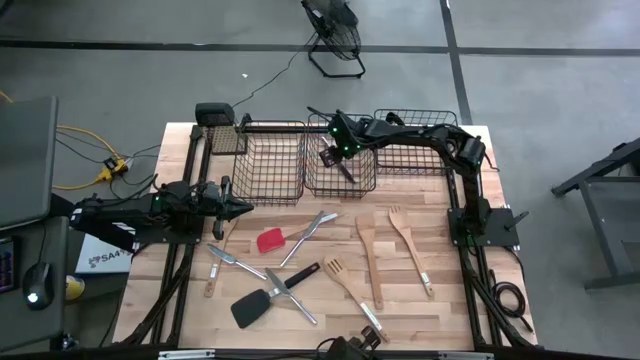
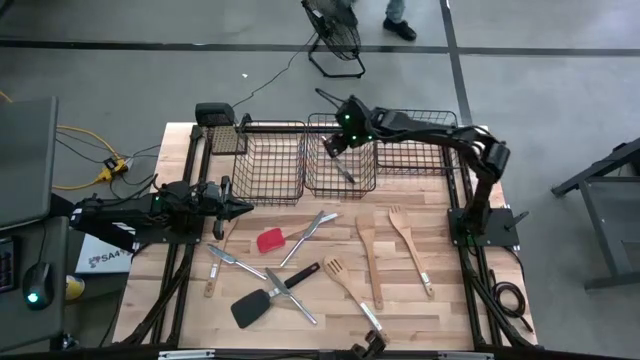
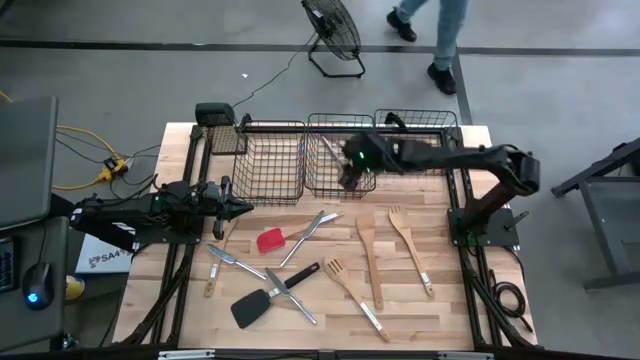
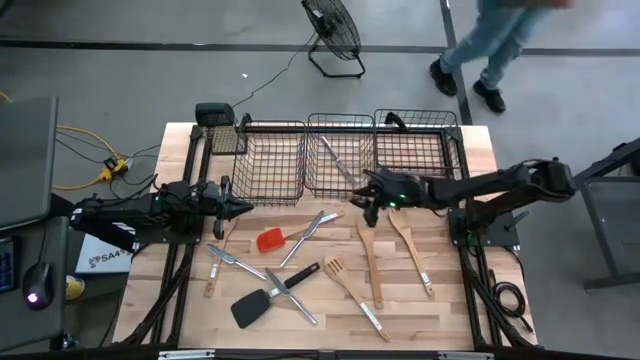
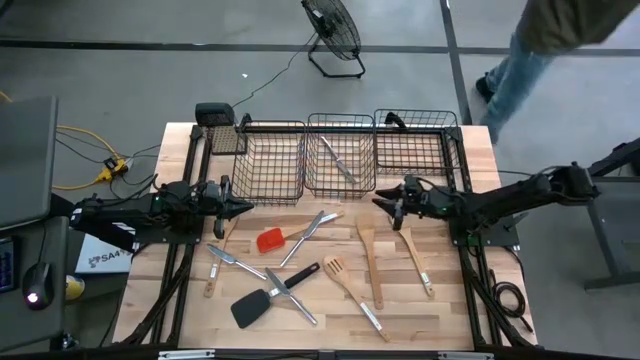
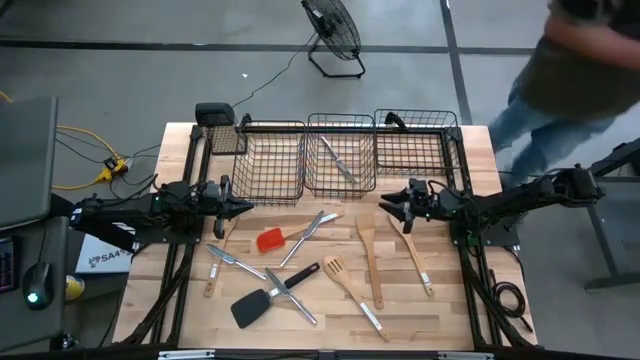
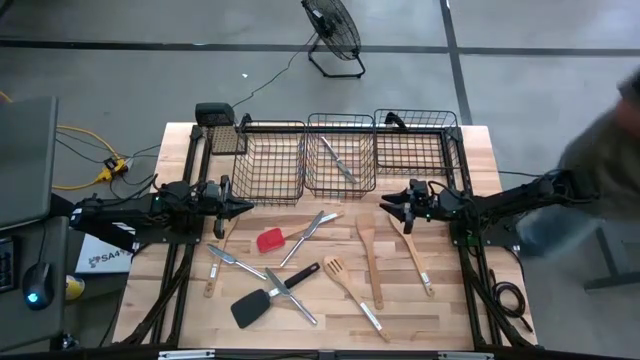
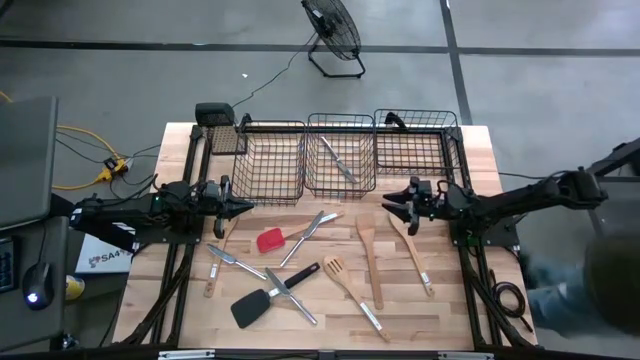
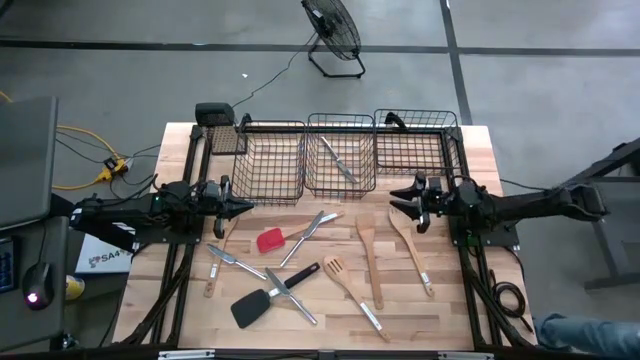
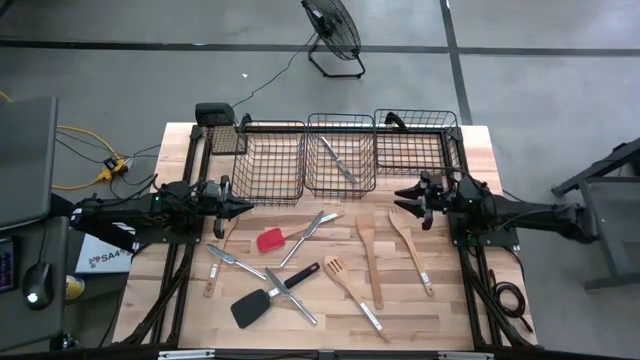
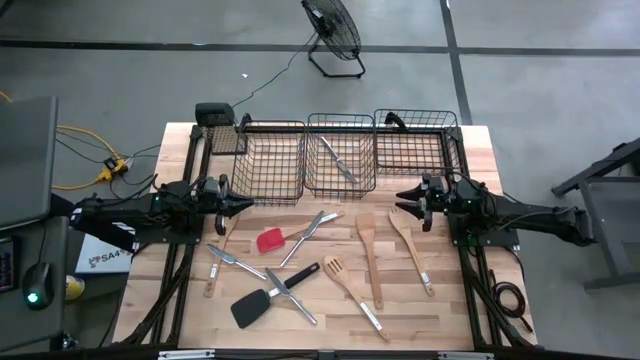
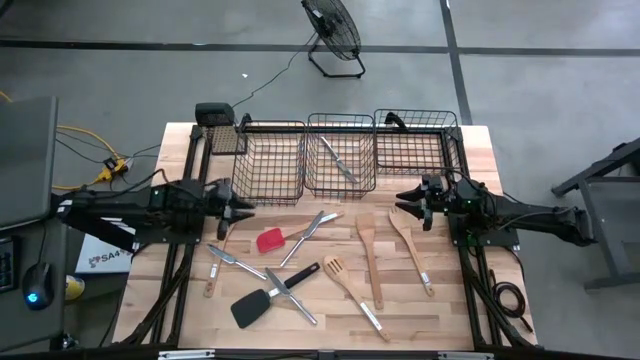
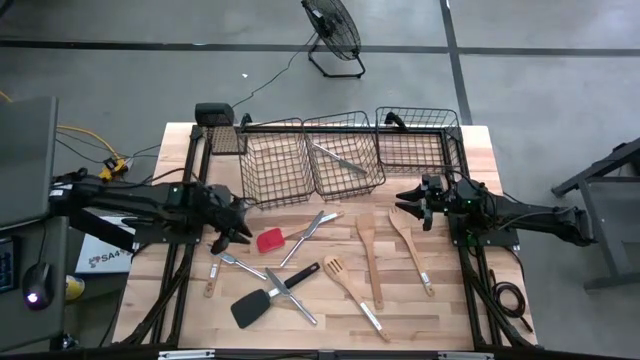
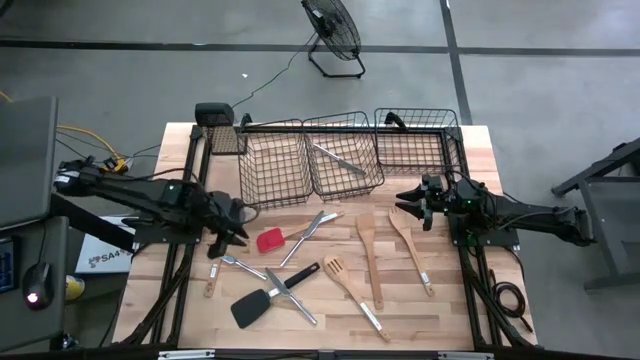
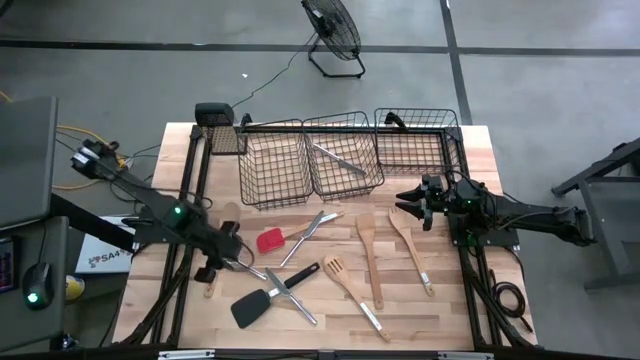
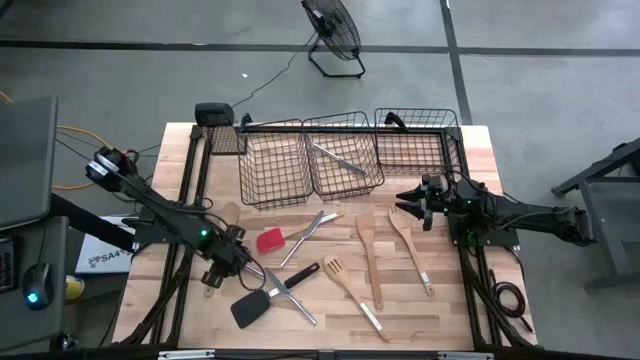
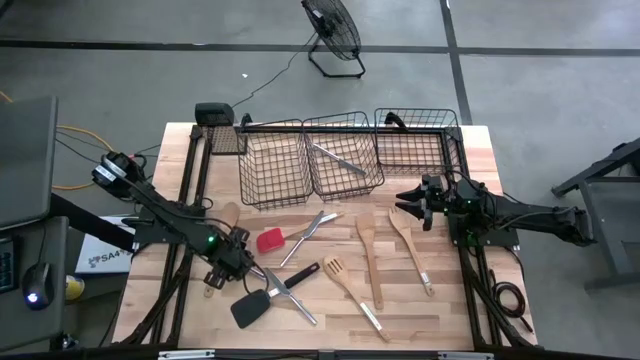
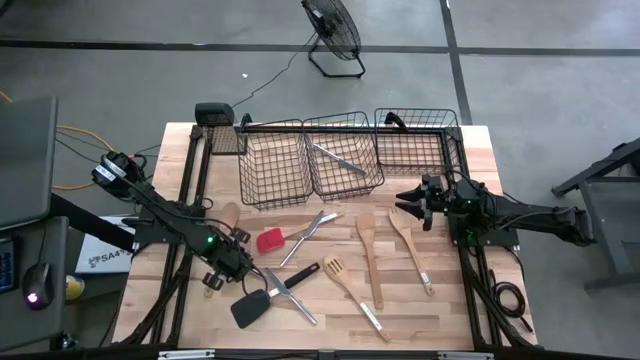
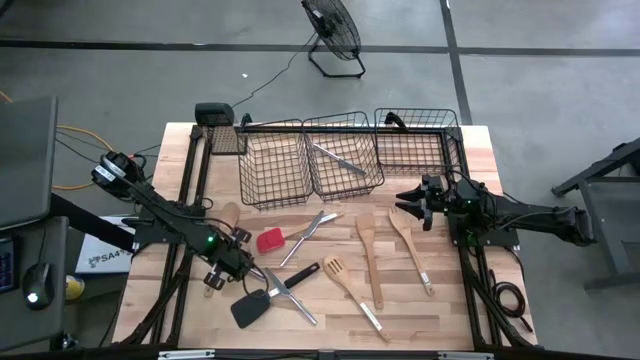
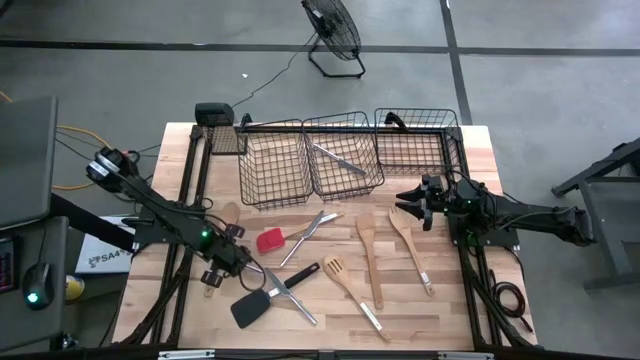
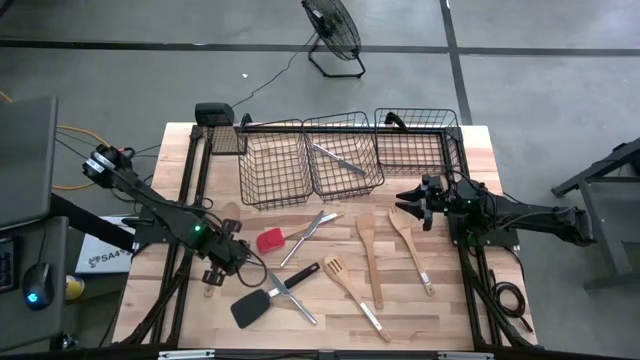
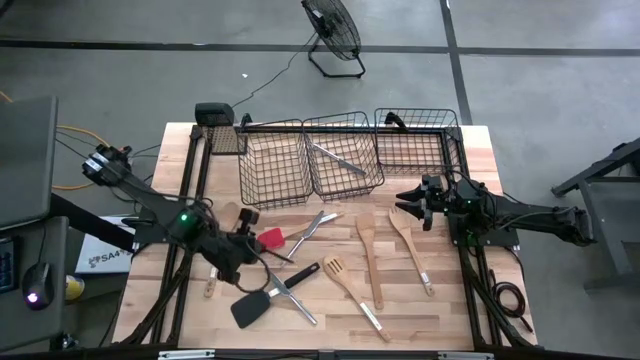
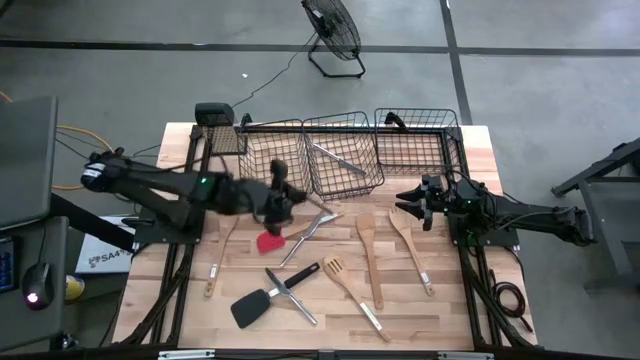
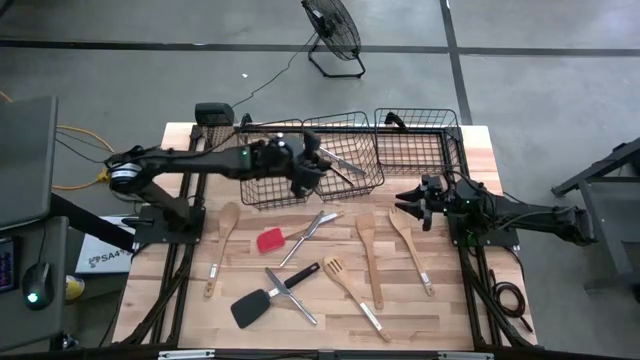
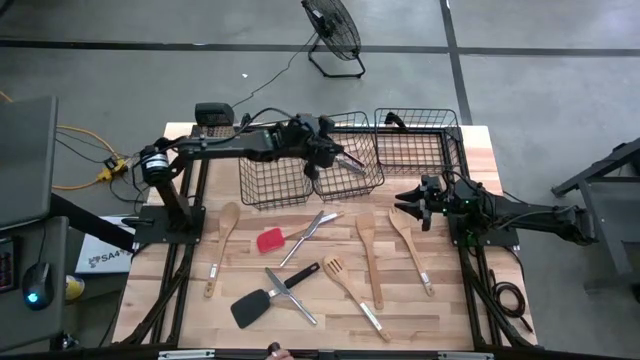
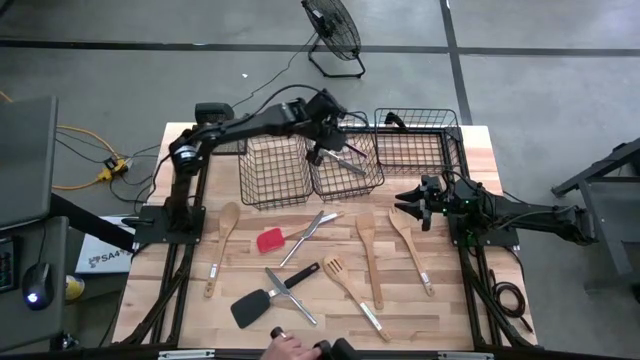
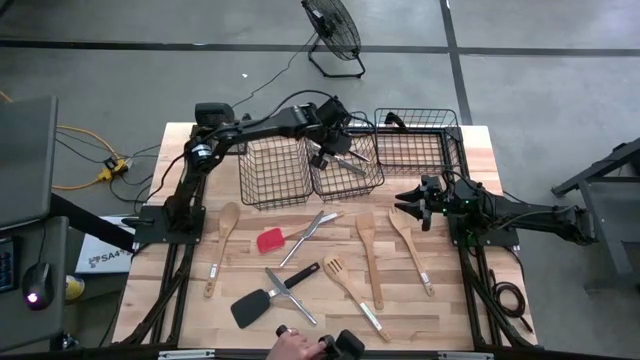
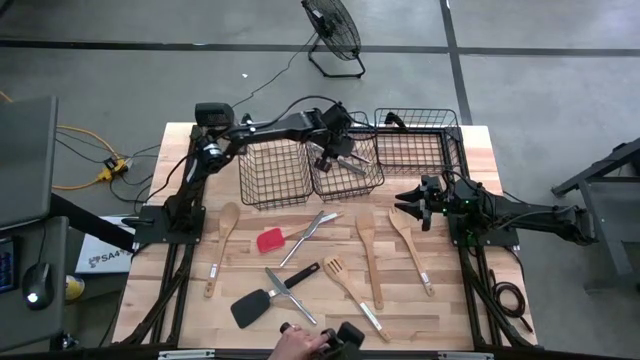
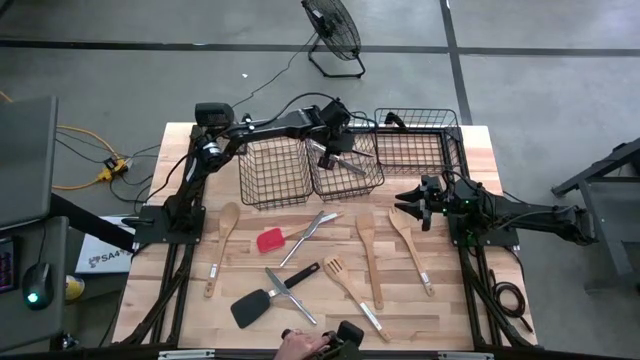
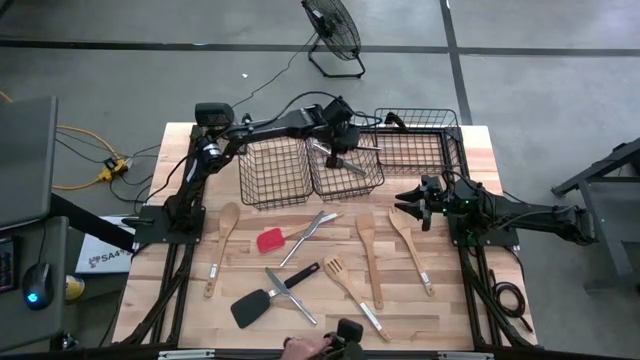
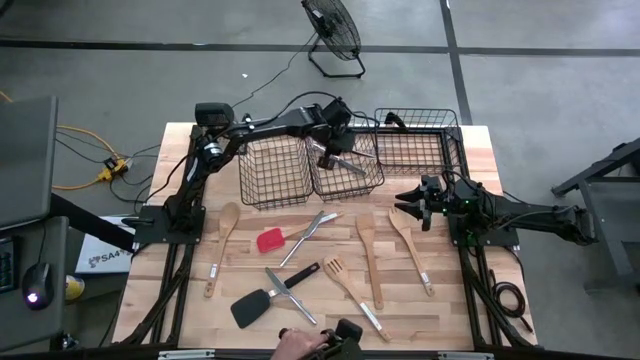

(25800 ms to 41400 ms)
Task: Pick & Place Kitchen Items
Put the silver knife into the middle wire basket
